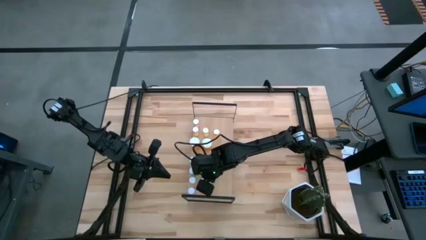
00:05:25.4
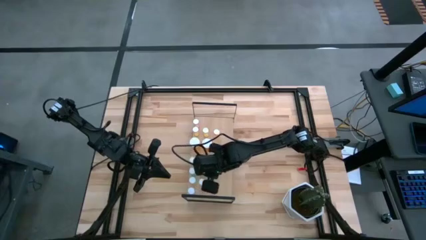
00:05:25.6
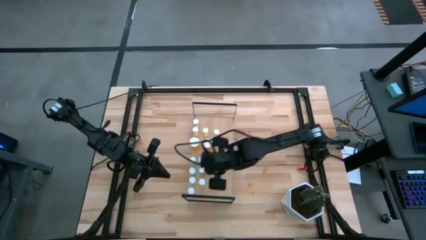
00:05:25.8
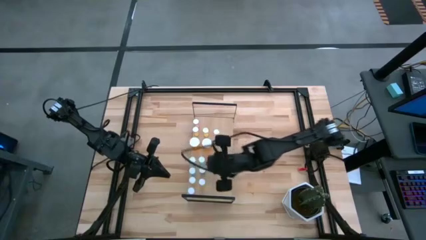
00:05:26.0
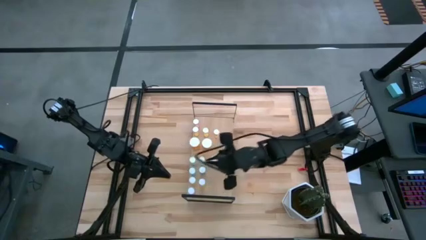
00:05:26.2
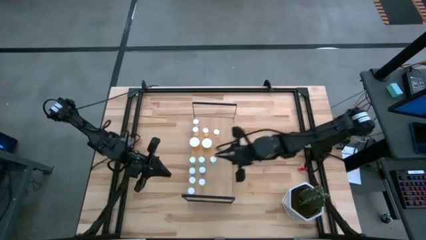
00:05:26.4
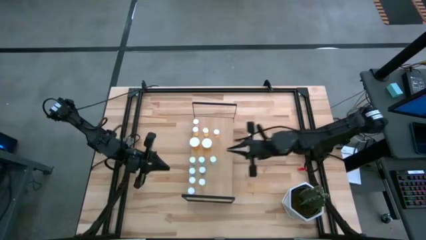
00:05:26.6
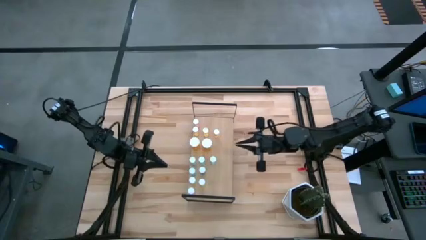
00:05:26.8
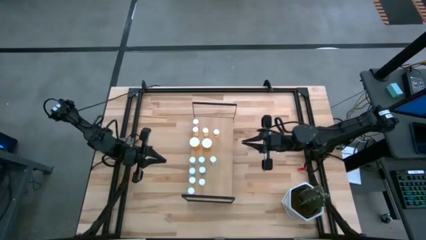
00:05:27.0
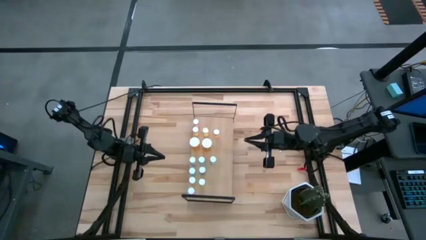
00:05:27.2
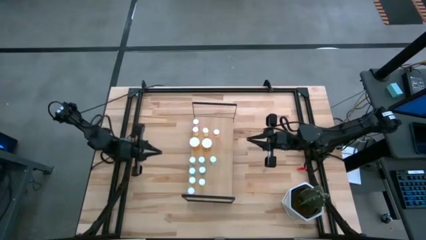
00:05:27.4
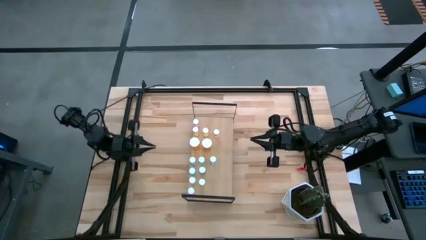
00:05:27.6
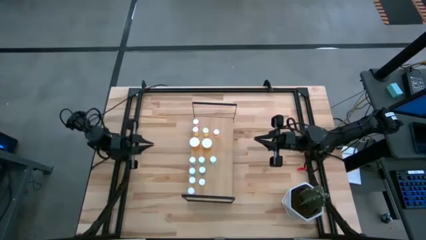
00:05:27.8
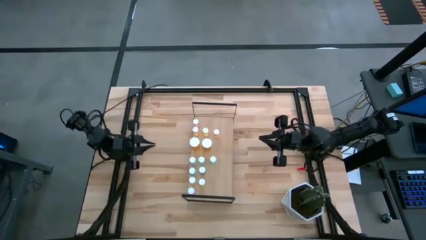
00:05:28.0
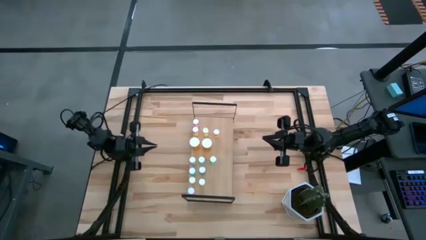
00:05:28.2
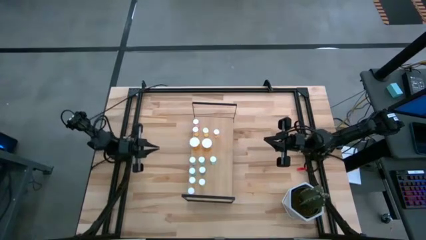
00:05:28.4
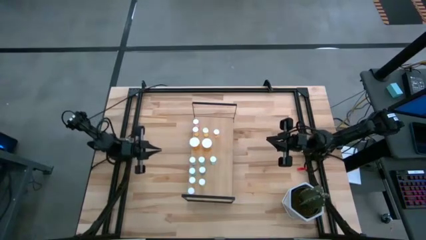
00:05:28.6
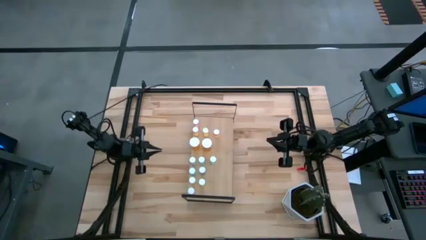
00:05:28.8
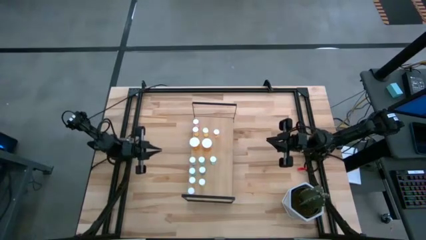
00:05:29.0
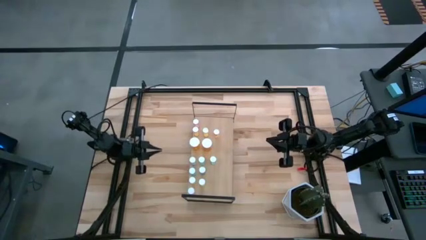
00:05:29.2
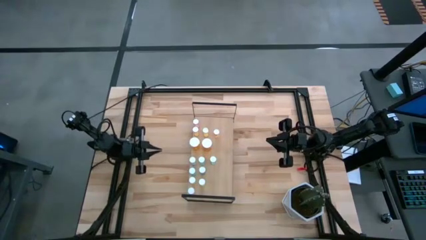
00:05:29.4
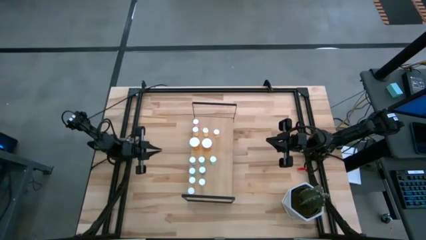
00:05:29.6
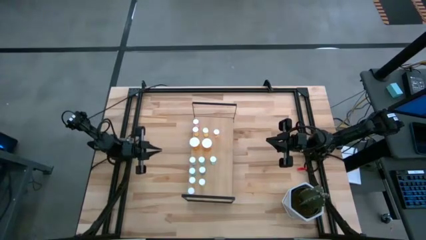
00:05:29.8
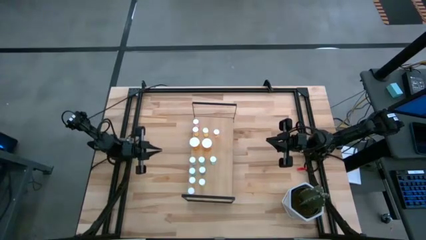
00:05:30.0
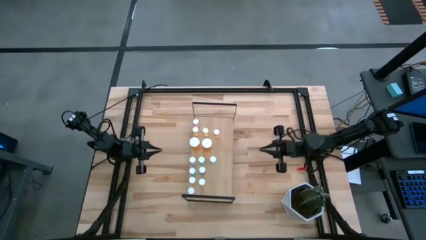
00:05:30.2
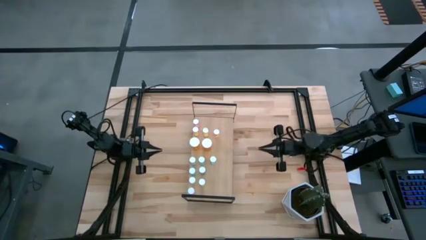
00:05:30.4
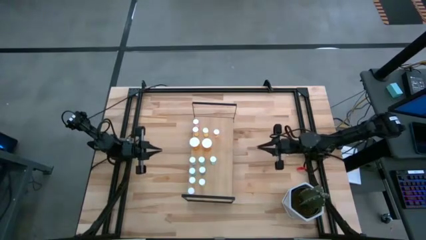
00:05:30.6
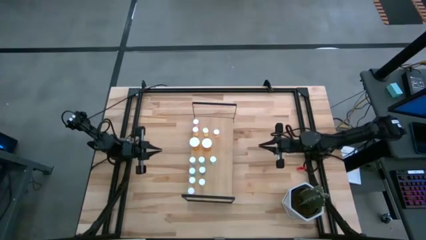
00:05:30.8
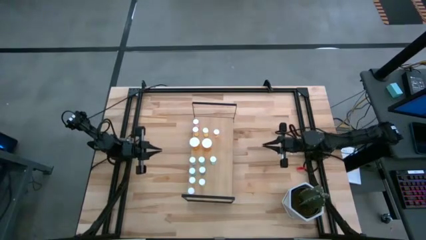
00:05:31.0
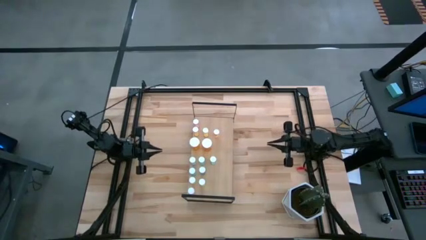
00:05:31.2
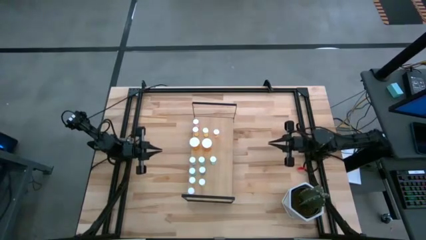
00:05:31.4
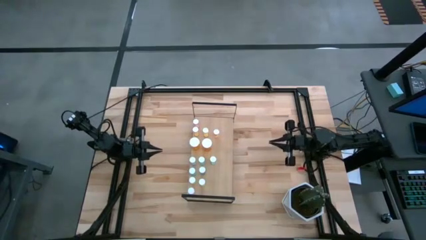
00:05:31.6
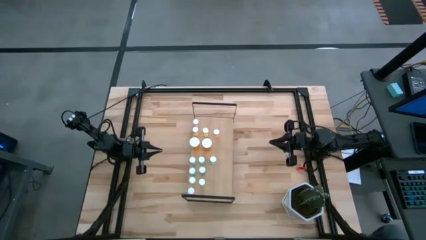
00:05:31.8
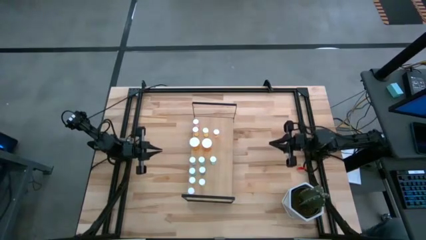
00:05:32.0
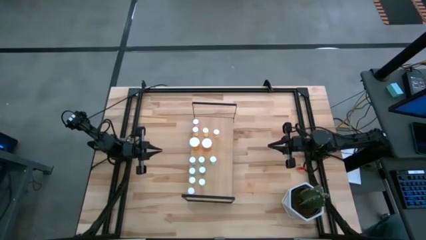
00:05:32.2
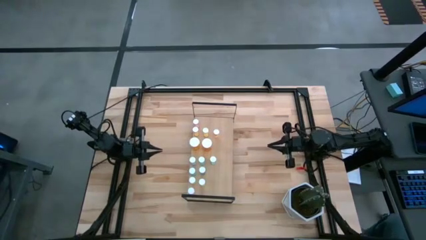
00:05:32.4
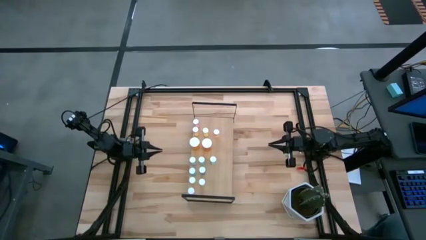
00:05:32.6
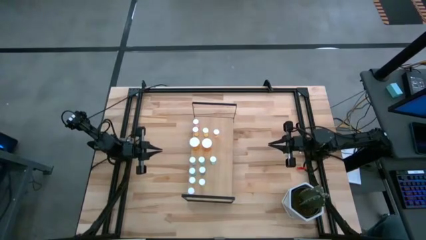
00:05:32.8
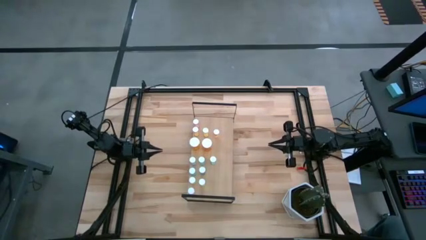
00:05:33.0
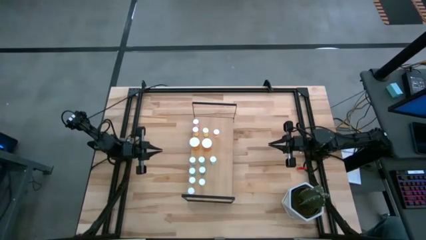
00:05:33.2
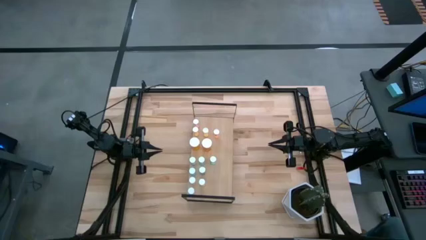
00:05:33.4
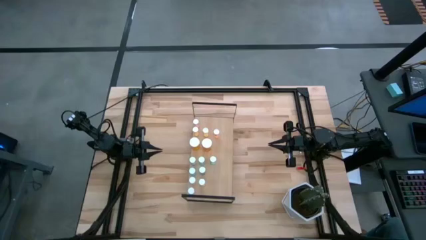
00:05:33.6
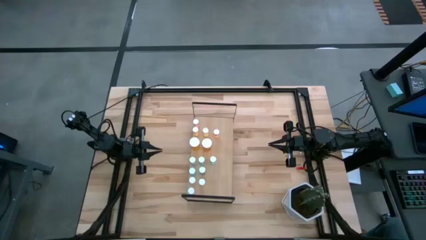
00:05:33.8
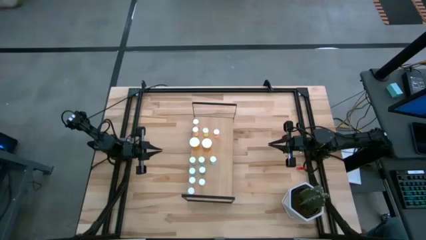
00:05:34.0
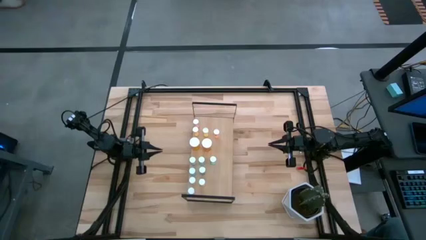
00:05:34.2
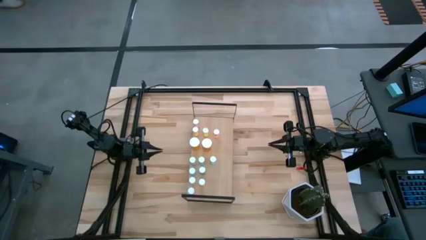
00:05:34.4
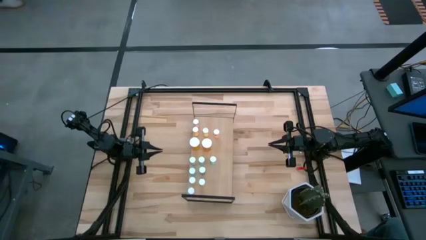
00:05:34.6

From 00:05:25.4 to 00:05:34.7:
Task: Pick and place medicine bottles onto shelf by color
Return to Home Position

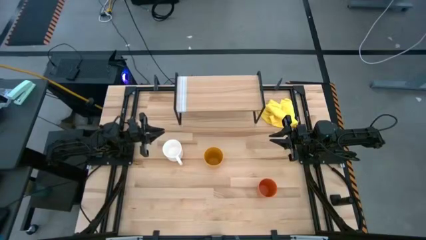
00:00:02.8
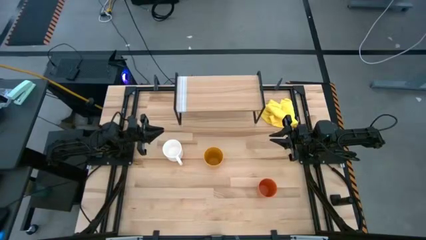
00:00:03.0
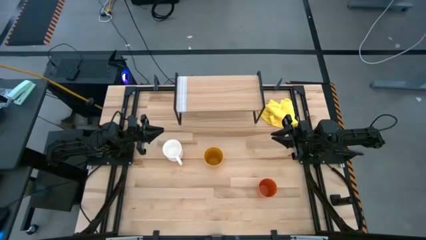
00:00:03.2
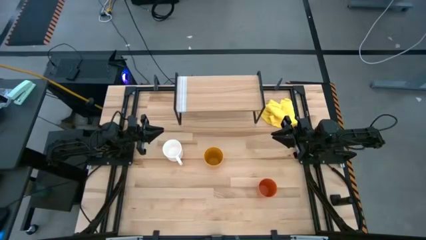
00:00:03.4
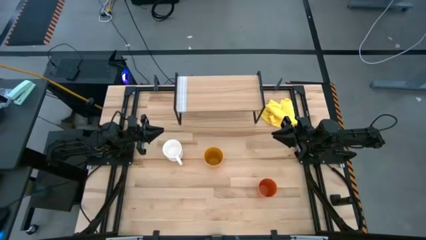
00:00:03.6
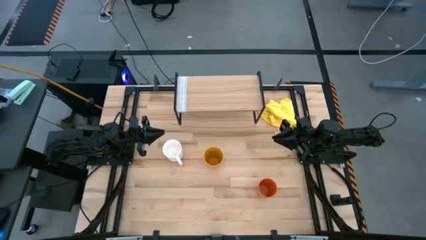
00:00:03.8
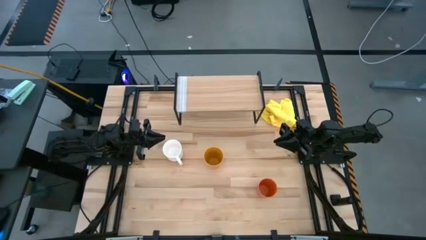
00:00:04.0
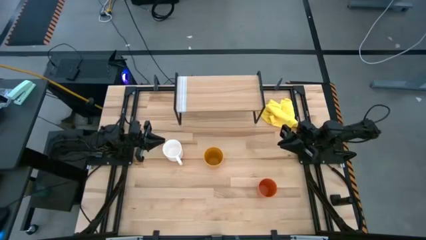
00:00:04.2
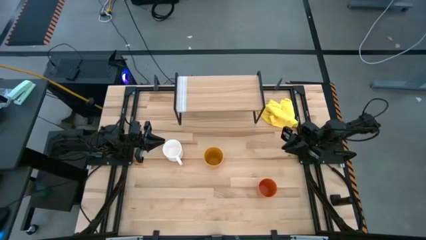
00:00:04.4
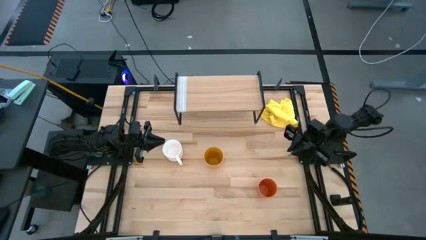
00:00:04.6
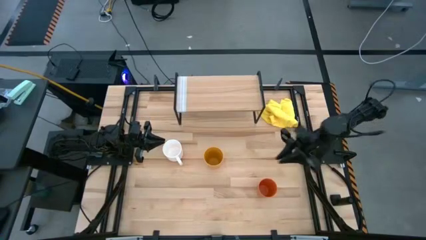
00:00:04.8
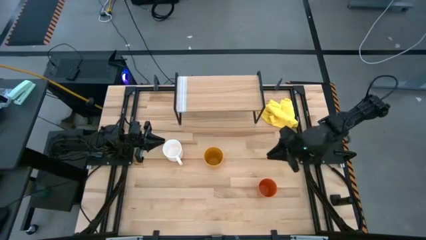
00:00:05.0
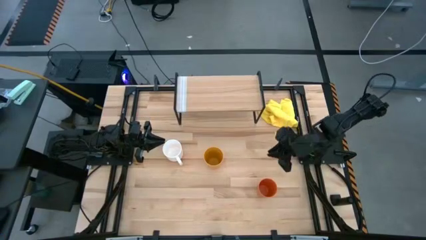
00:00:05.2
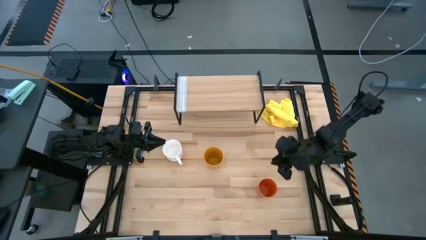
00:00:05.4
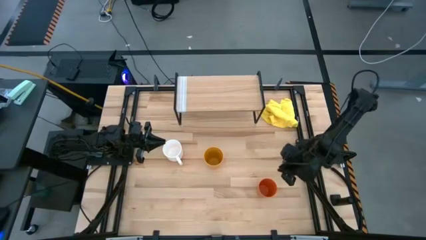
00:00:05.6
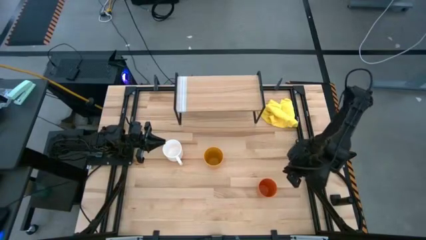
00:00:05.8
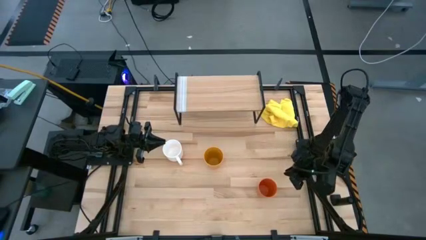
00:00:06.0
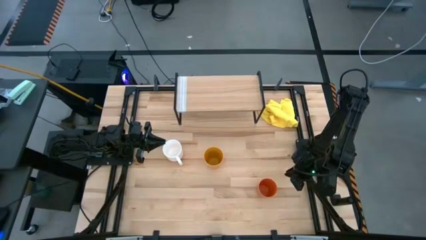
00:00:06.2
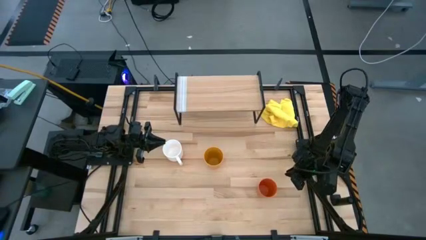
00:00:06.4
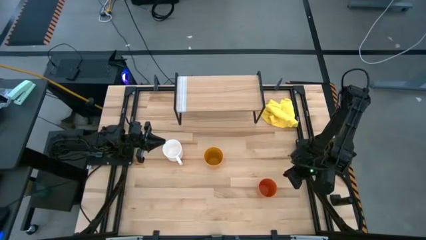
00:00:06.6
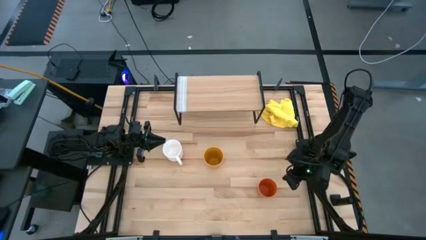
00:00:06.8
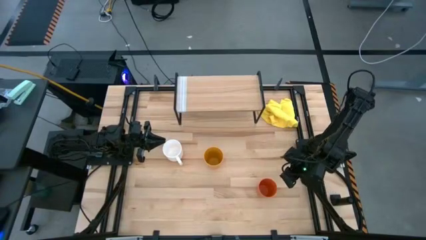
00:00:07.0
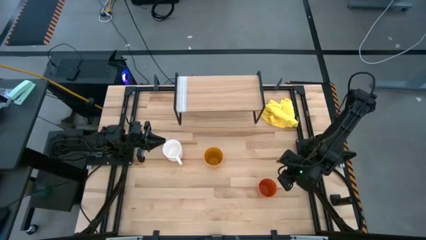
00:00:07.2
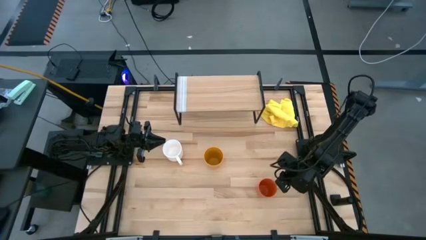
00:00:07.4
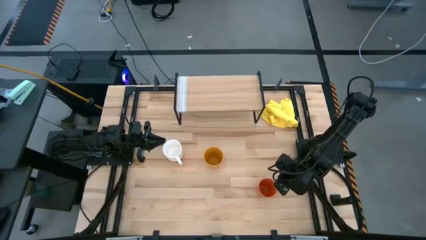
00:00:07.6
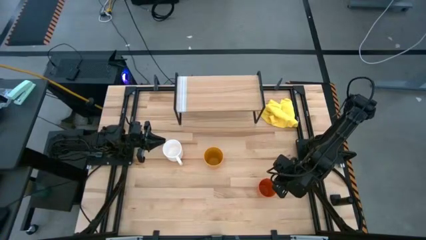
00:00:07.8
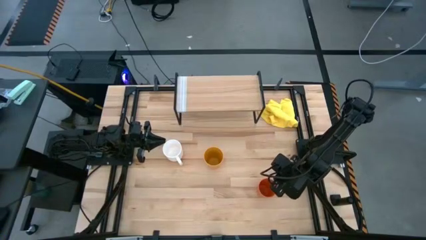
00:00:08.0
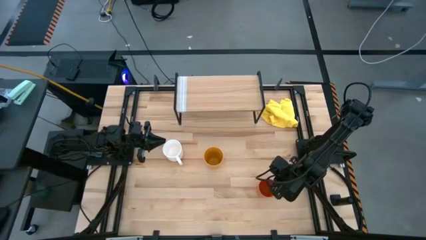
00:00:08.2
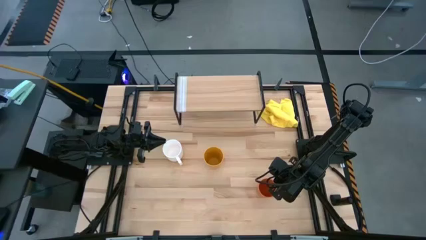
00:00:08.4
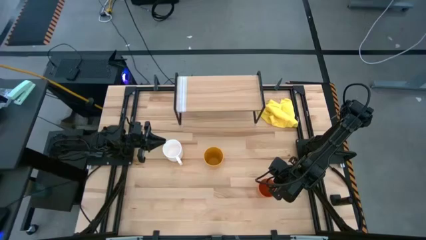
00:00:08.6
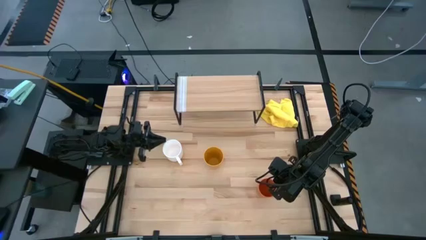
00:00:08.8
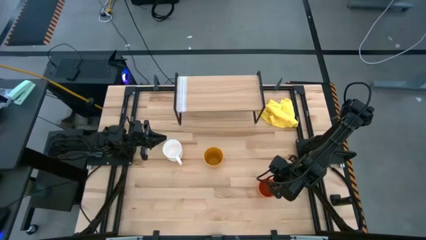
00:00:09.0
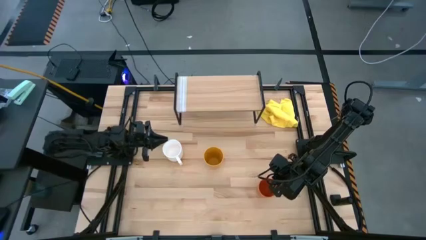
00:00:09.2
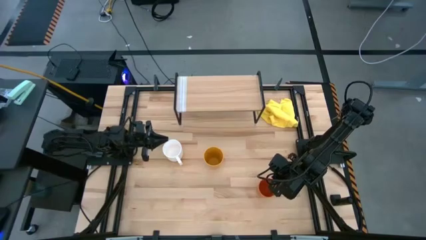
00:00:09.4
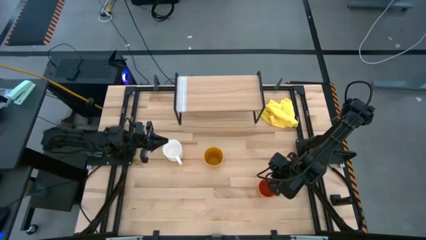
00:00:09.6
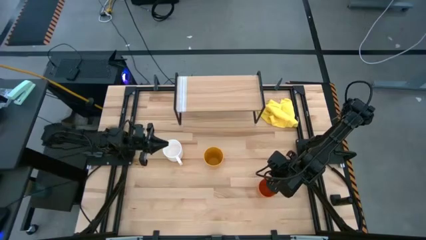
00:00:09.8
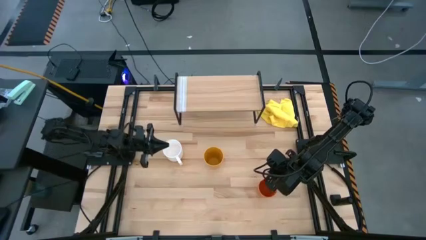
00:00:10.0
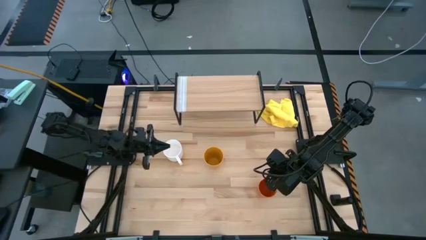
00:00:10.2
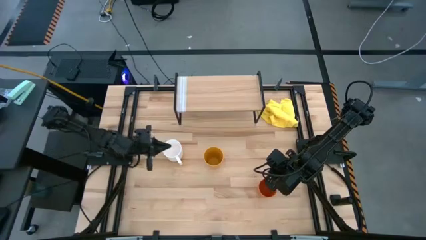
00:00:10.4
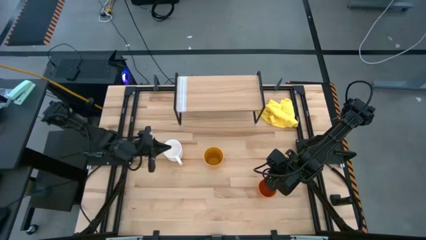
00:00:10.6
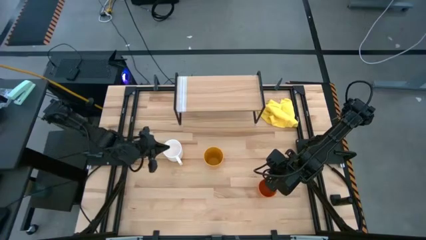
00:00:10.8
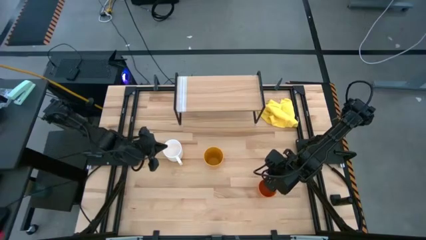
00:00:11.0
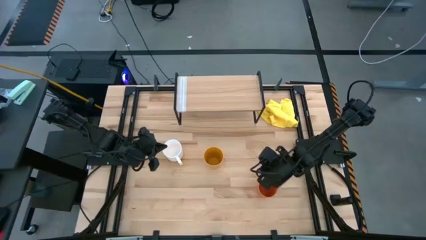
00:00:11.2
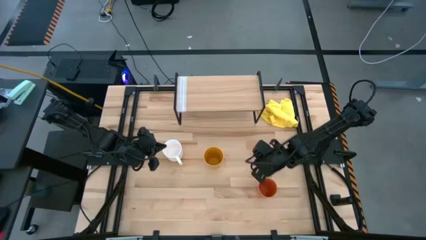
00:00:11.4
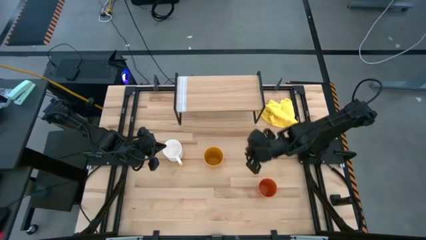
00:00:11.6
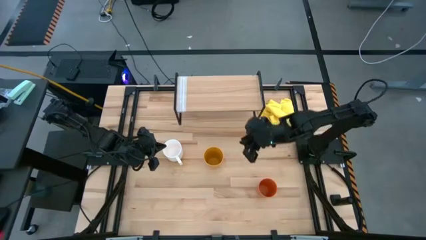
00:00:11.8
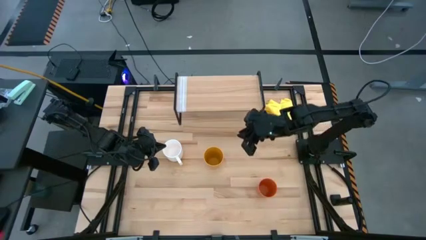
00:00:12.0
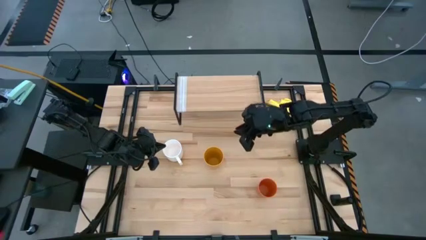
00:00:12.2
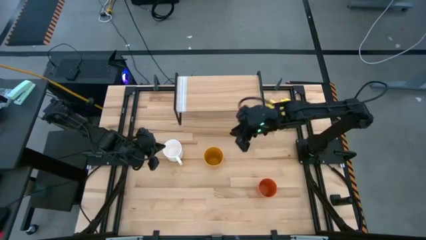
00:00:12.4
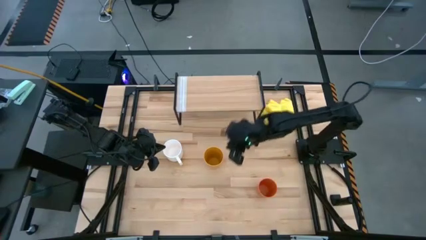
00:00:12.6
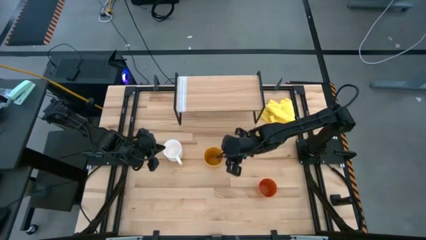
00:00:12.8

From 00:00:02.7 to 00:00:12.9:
Task: Stack small to large cups/mugs on shelf
Put the yellow cup on the shelf
